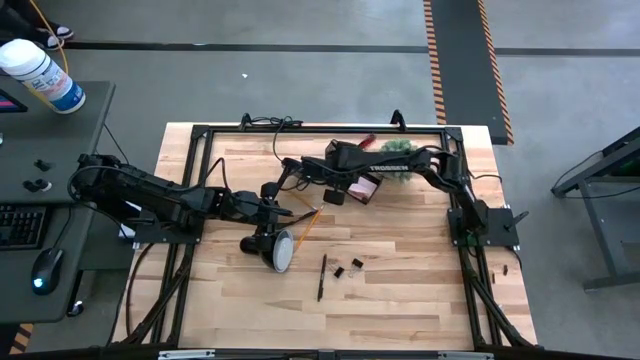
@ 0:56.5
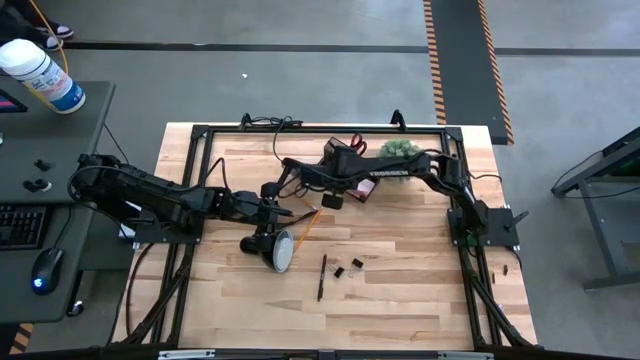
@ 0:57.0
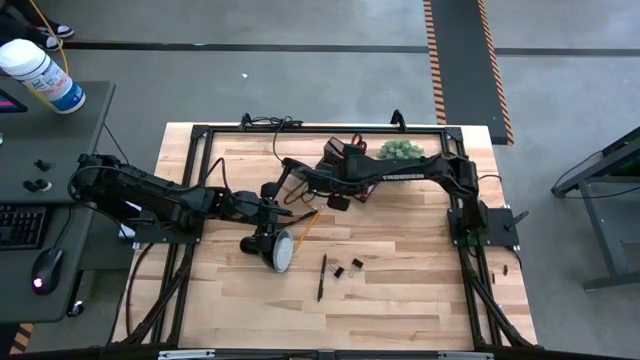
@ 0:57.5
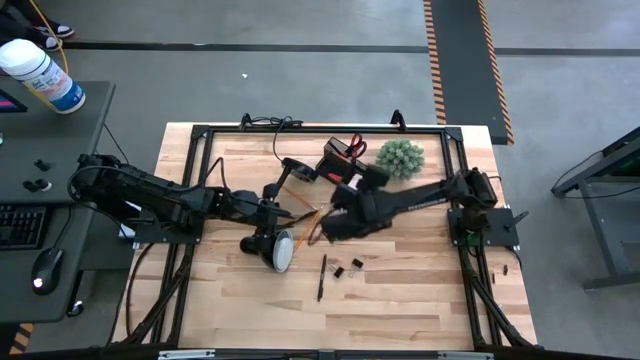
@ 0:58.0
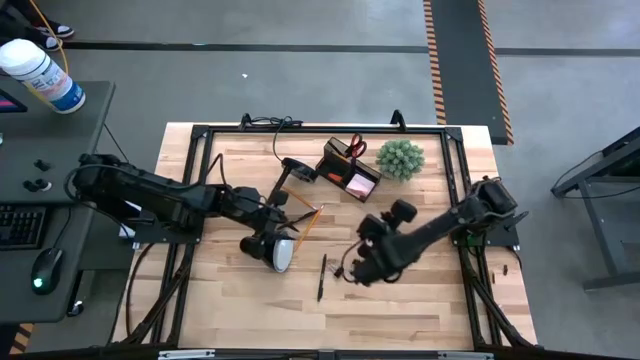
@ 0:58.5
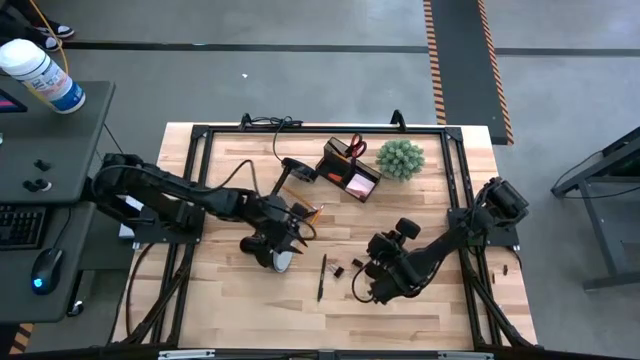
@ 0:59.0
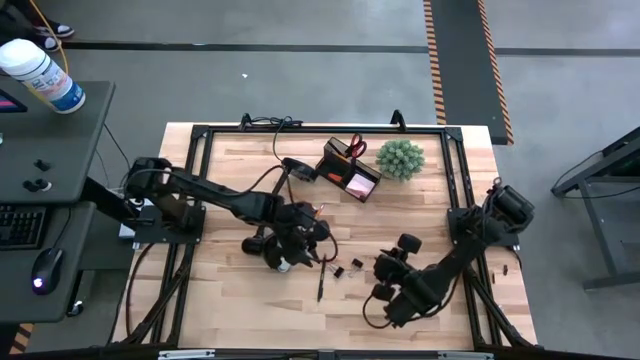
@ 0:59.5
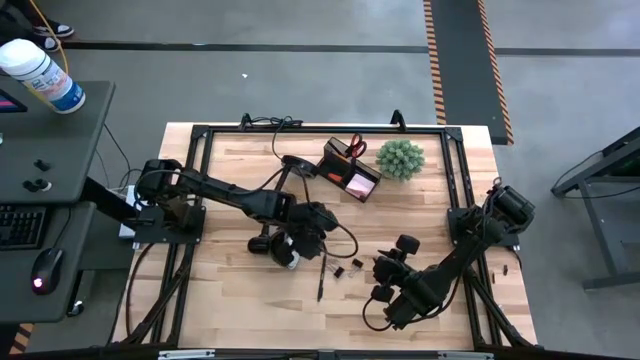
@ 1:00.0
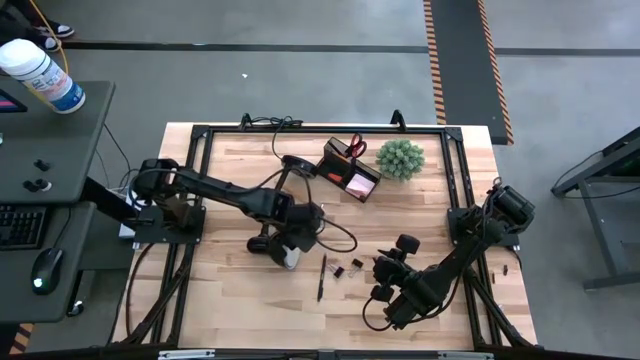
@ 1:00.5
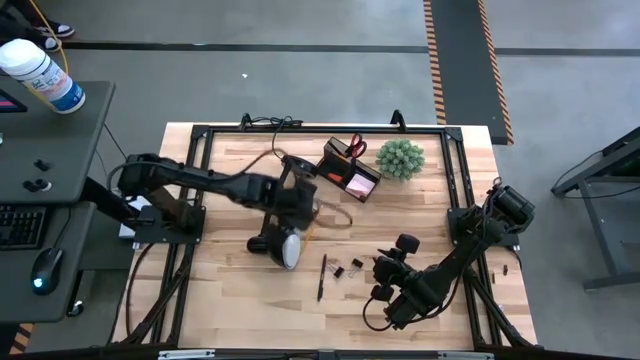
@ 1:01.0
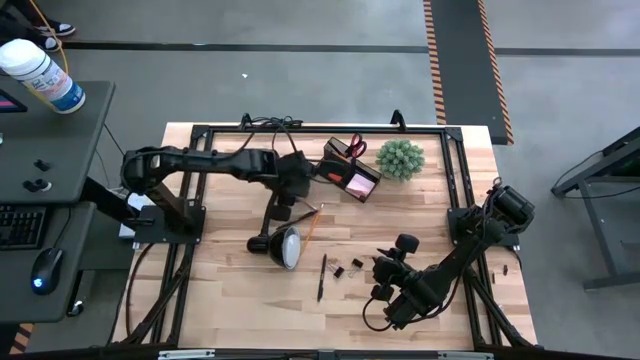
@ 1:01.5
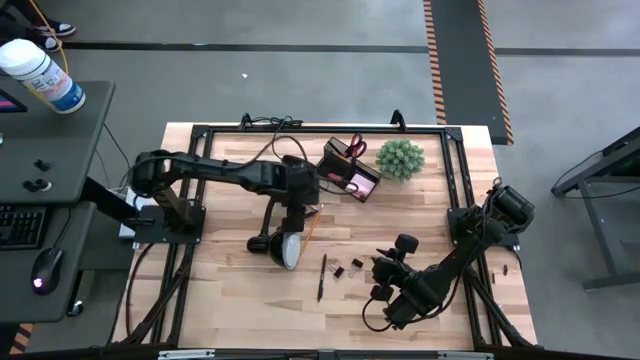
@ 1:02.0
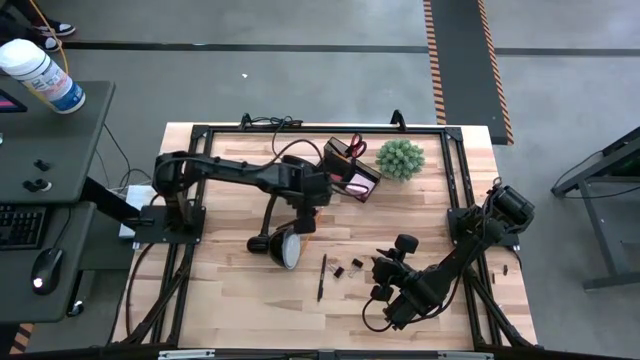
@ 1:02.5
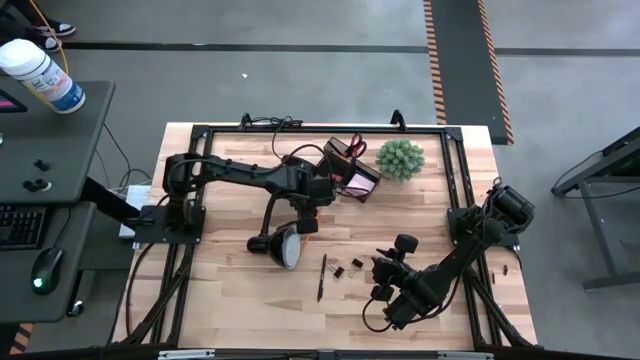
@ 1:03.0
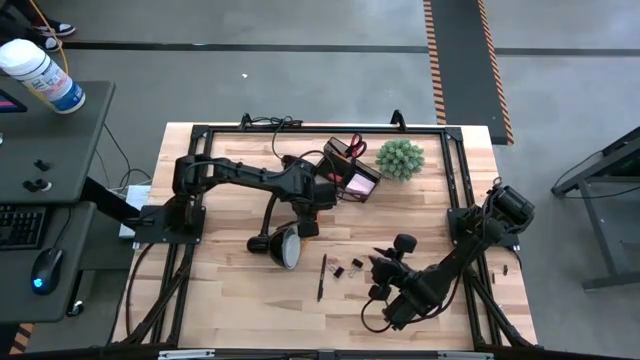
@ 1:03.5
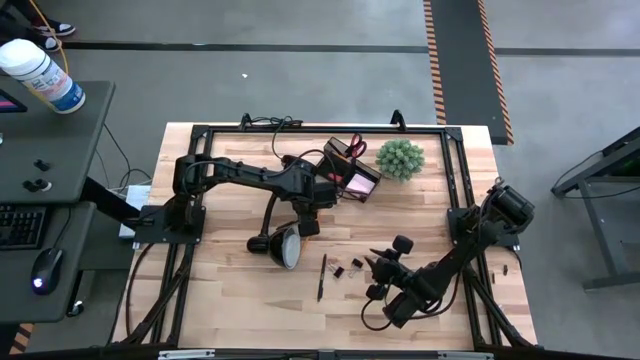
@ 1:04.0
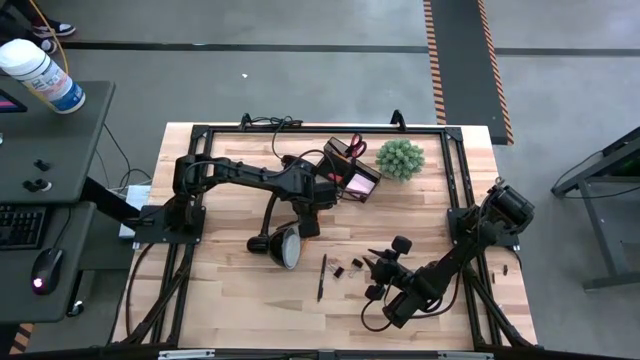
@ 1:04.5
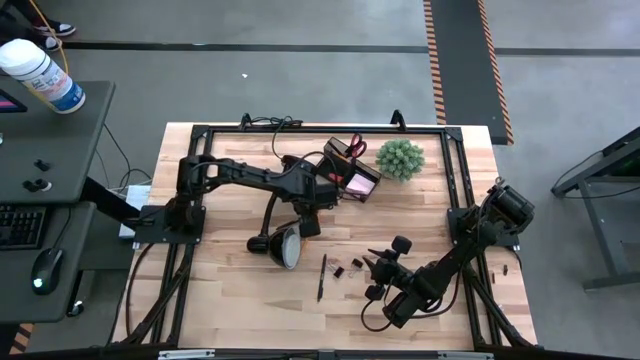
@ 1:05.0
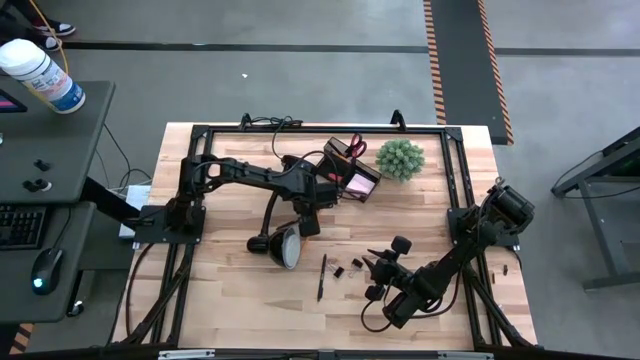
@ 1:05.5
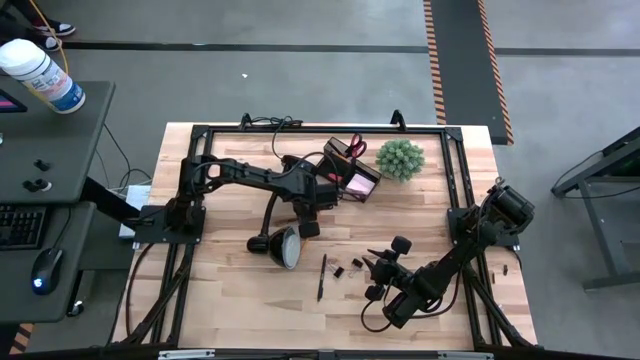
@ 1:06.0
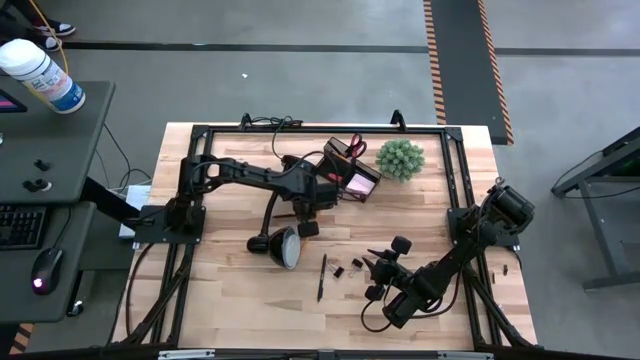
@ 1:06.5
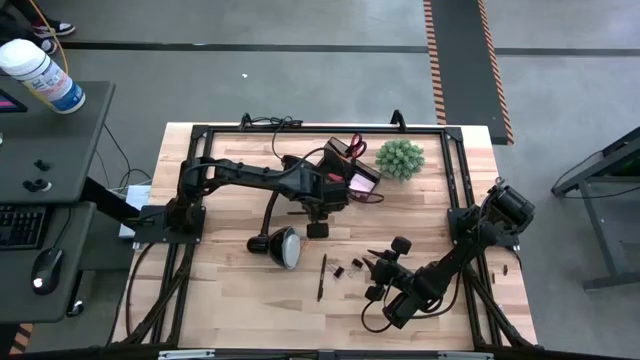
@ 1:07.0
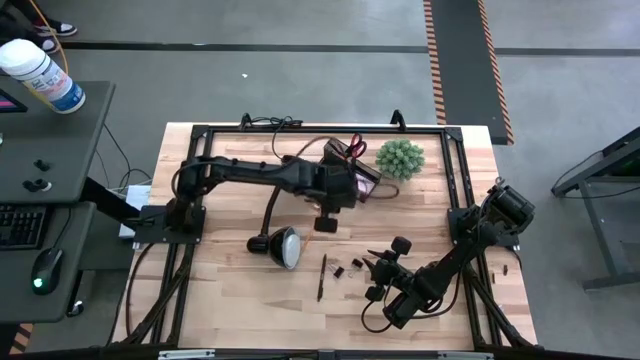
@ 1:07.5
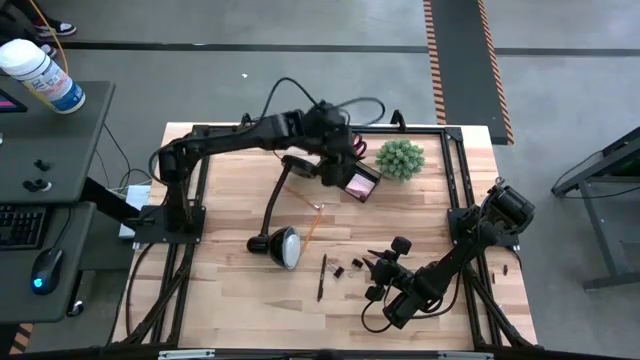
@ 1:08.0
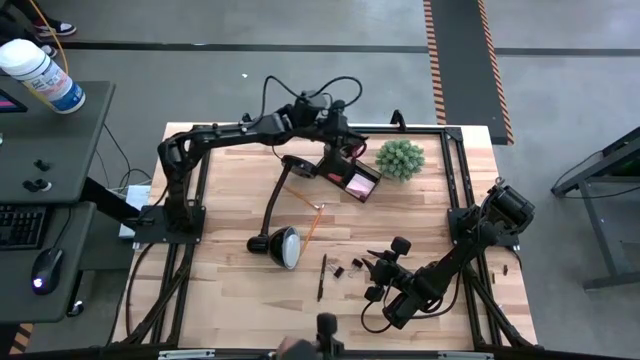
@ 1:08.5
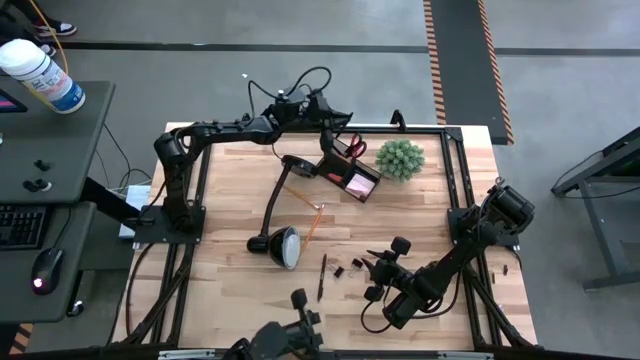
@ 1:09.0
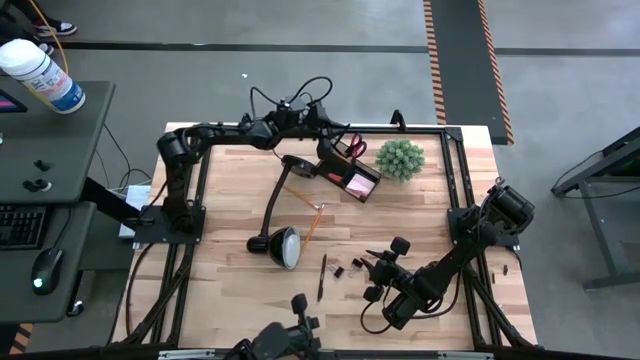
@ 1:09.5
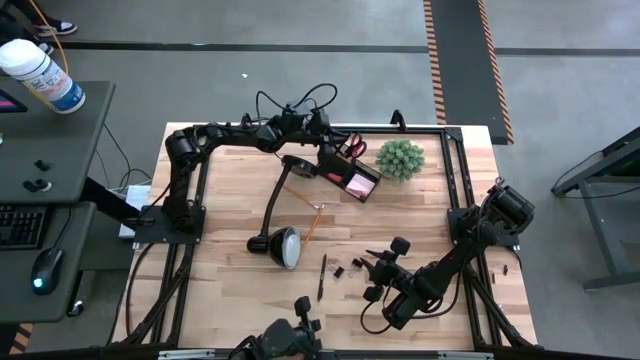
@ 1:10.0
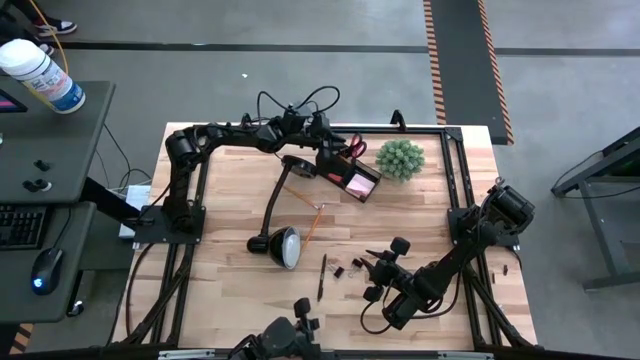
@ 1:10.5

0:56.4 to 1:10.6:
Task: Pick and place office supplies into organizer
Put the top black pen into the desk organizer

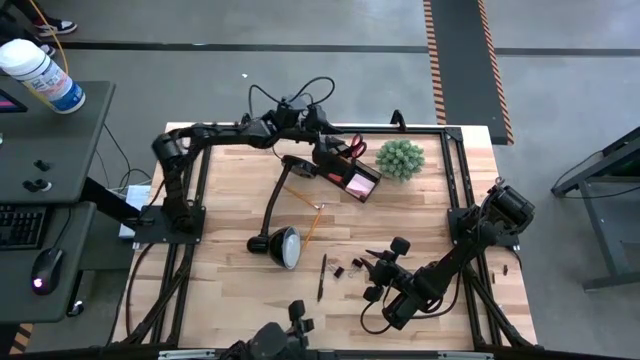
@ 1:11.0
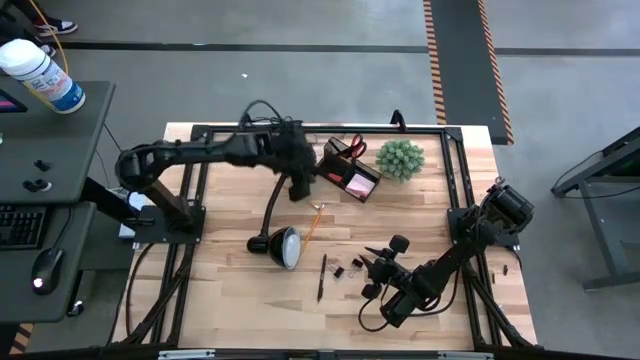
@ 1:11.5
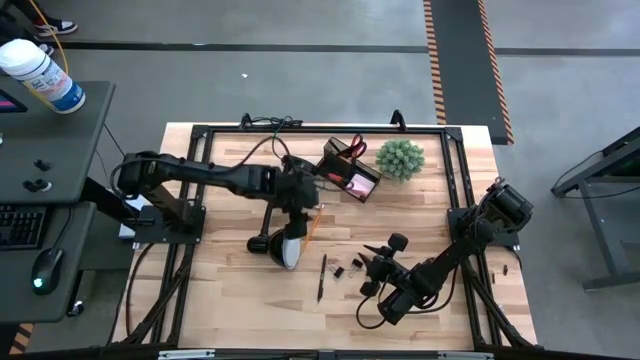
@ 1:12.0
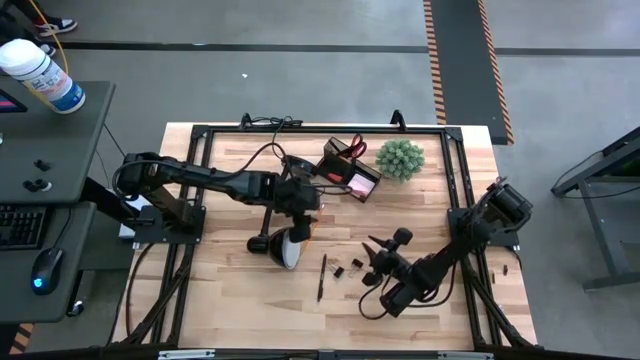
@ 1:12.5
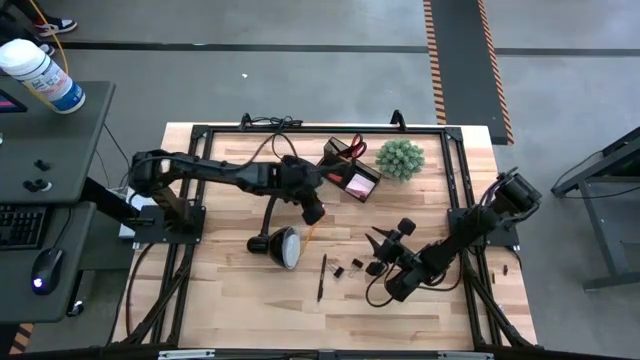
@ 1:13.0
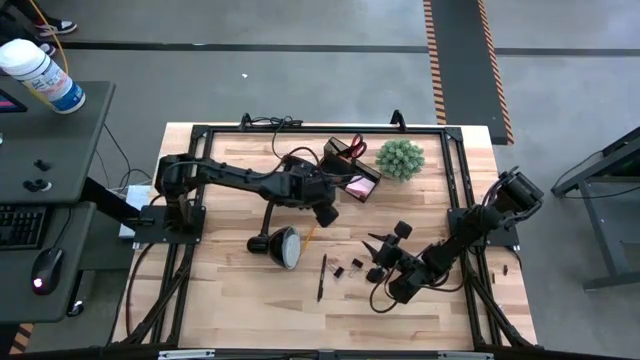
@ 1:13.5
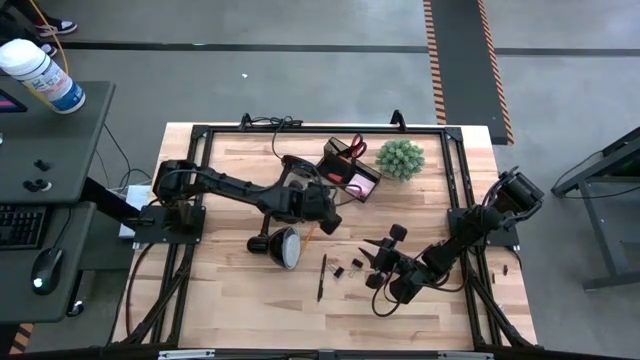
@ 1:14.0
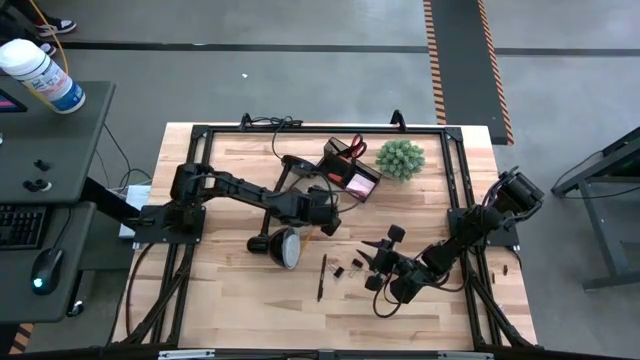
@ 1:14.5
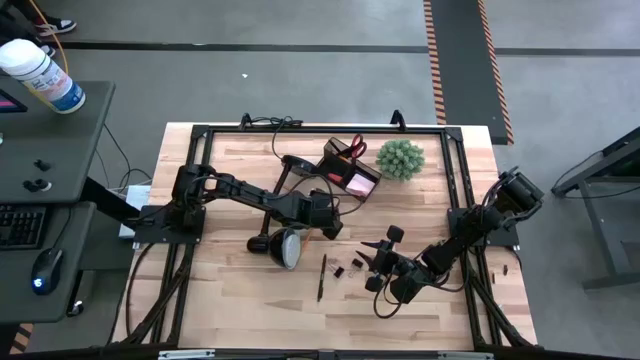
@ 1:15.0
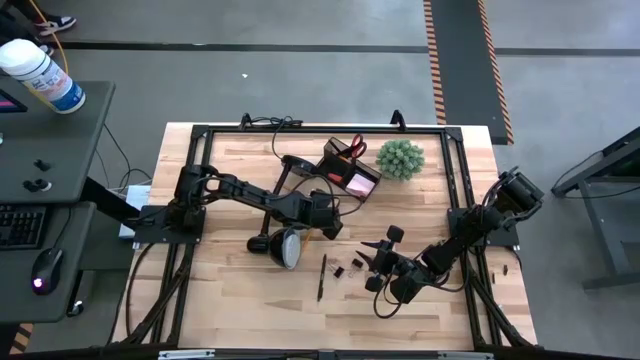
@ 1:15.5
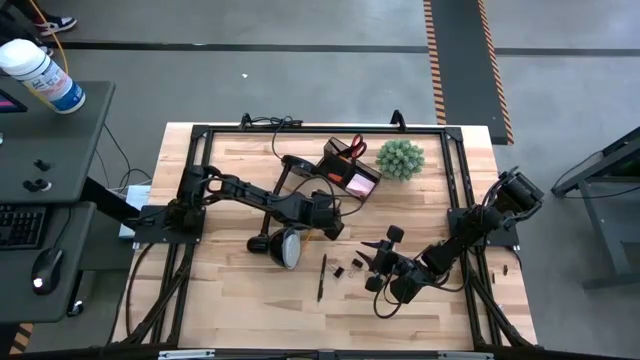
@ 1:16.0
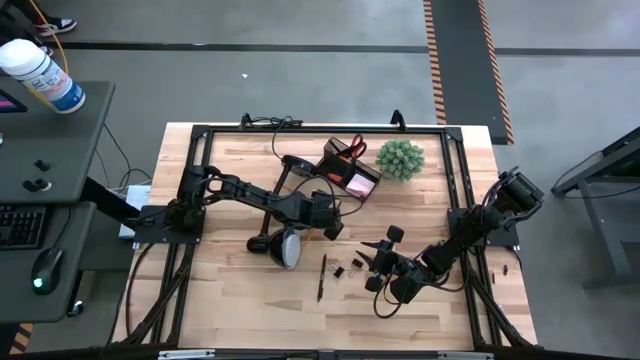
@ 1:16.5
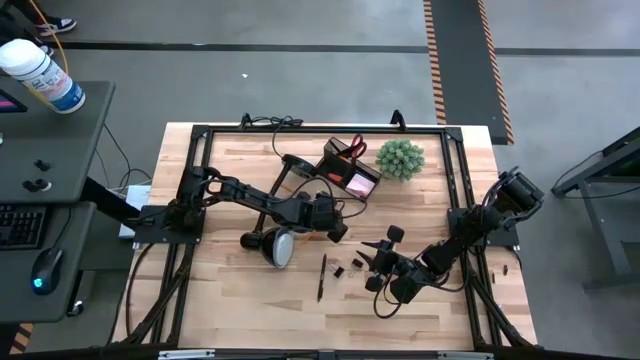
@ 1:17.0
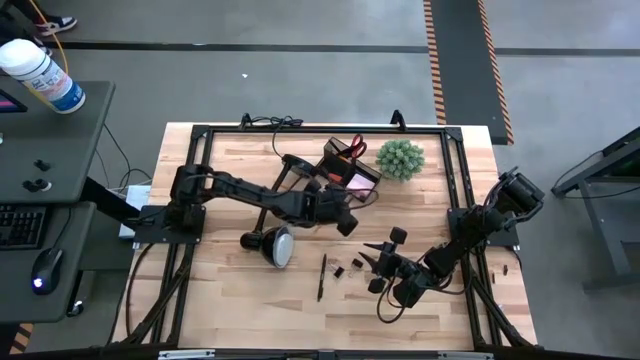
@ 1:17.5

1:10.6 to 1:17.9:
Put the bottom orange pencil into the desk organizer
